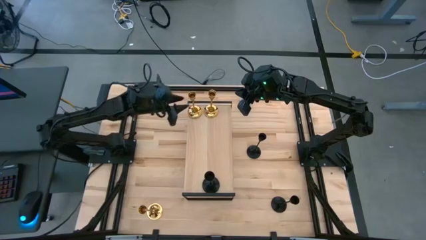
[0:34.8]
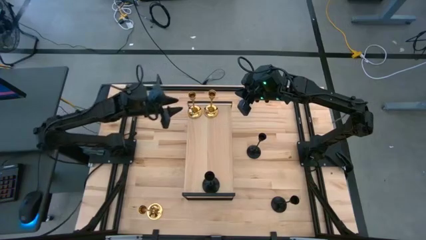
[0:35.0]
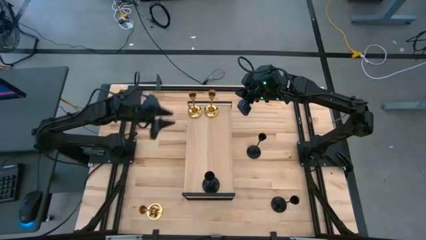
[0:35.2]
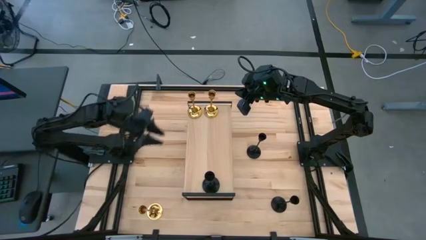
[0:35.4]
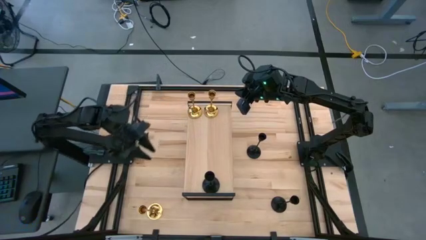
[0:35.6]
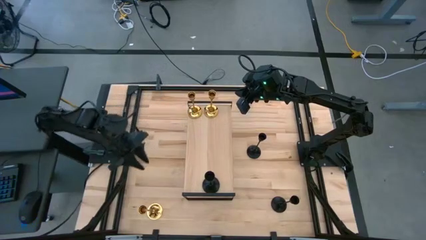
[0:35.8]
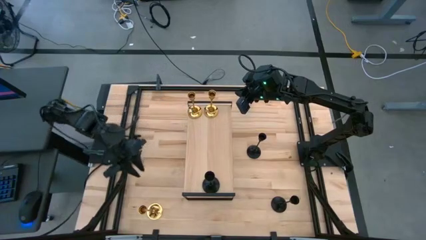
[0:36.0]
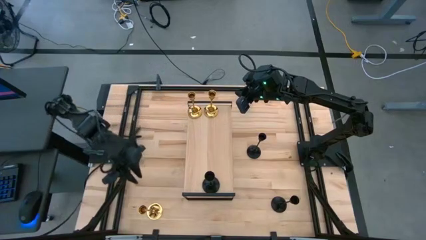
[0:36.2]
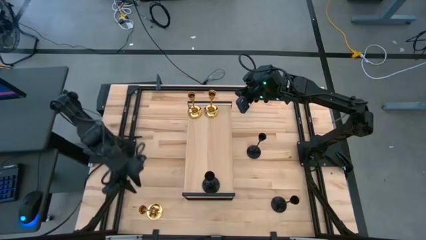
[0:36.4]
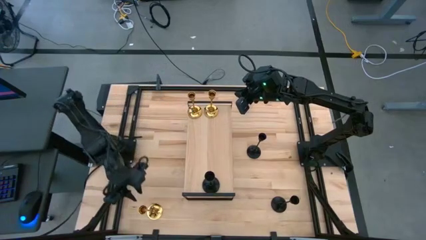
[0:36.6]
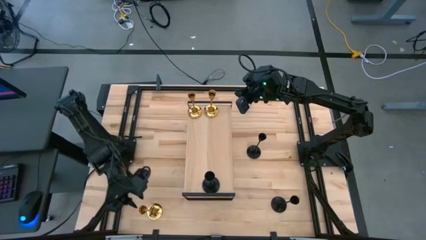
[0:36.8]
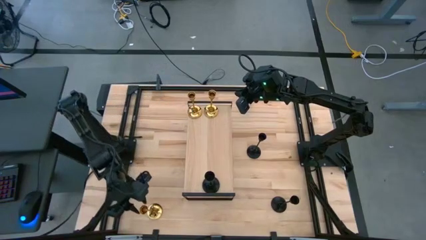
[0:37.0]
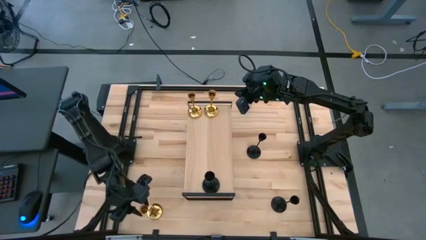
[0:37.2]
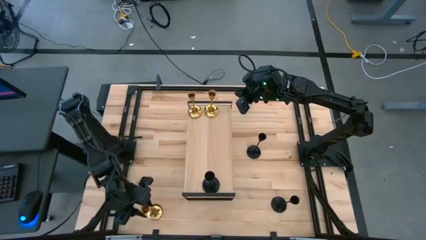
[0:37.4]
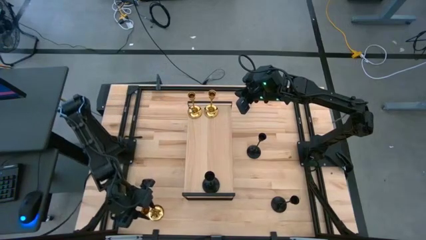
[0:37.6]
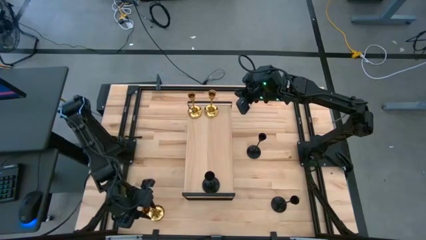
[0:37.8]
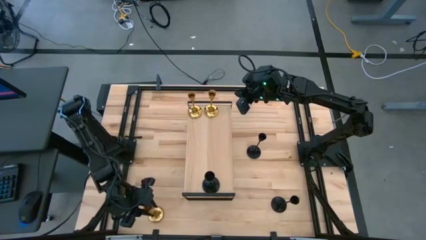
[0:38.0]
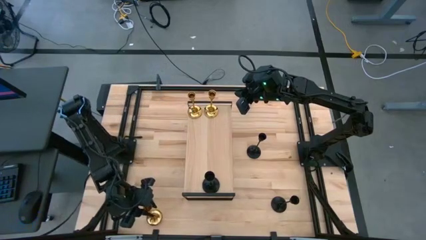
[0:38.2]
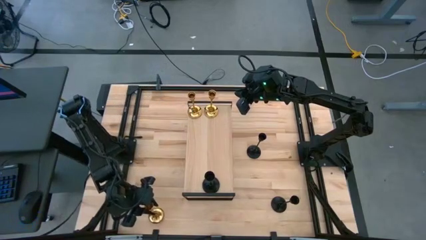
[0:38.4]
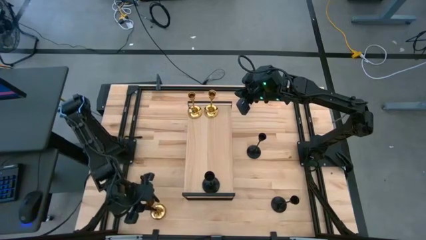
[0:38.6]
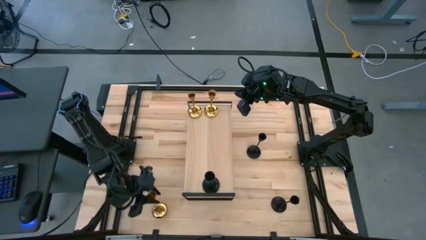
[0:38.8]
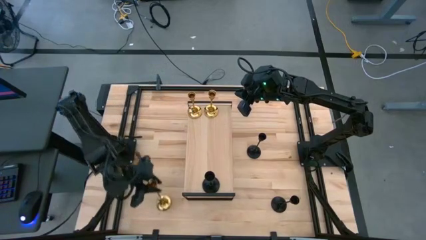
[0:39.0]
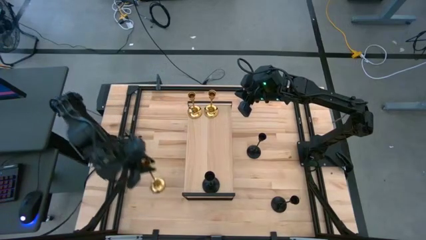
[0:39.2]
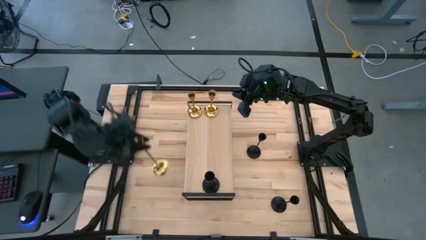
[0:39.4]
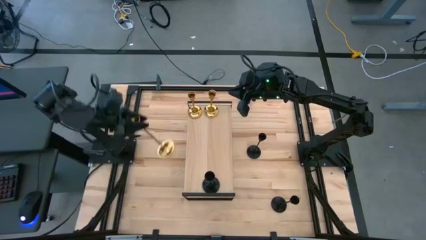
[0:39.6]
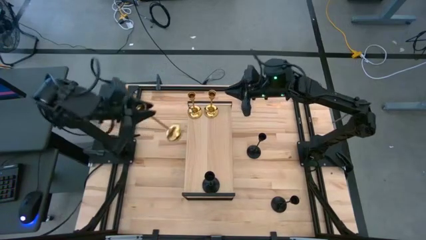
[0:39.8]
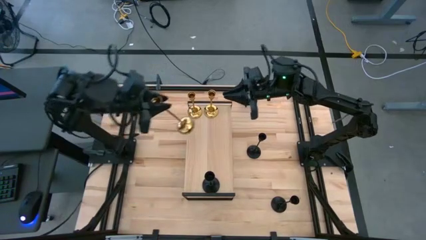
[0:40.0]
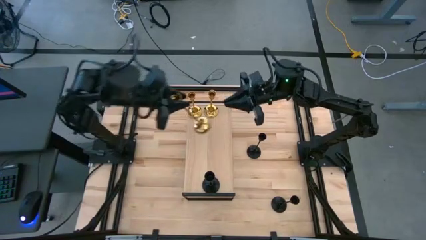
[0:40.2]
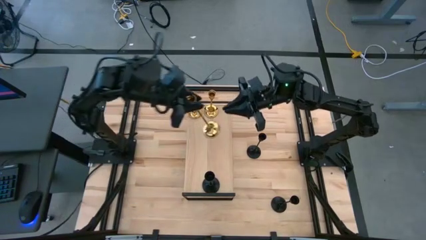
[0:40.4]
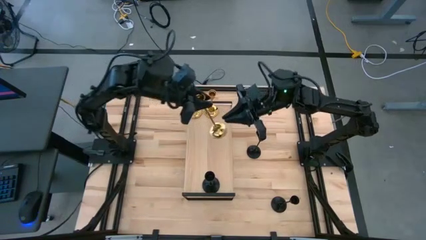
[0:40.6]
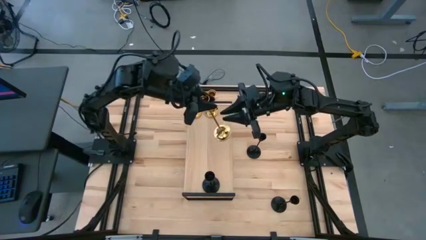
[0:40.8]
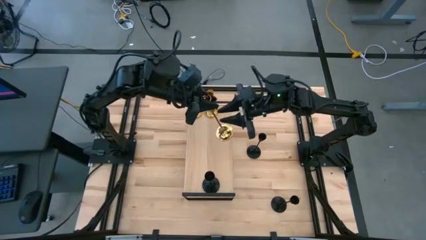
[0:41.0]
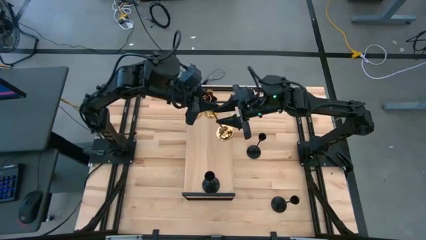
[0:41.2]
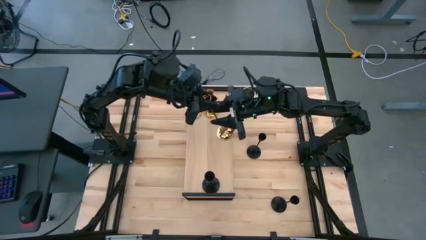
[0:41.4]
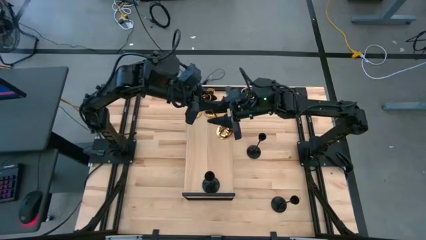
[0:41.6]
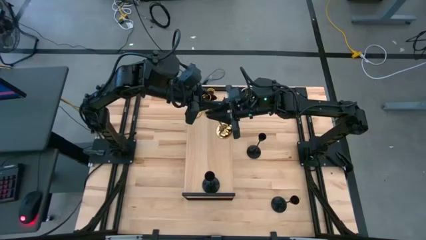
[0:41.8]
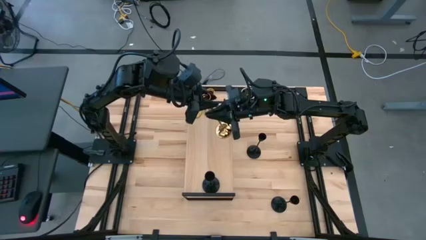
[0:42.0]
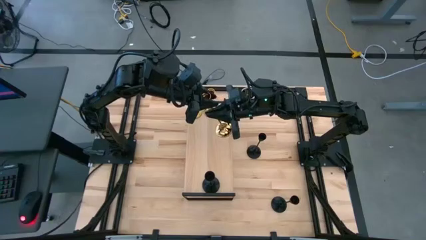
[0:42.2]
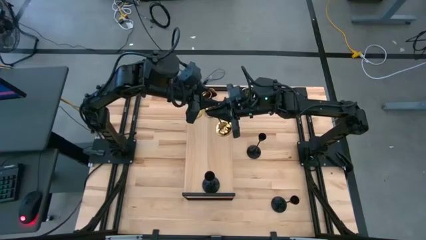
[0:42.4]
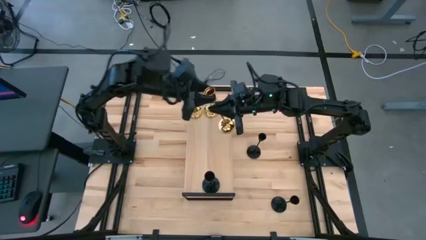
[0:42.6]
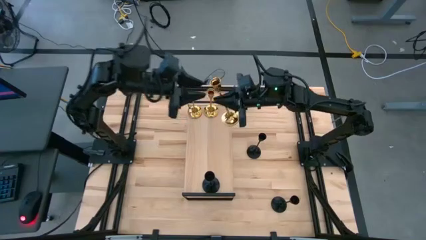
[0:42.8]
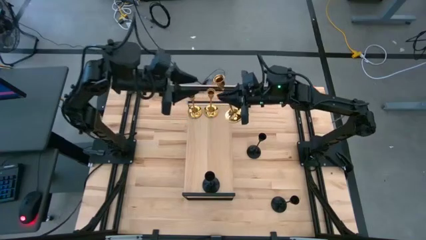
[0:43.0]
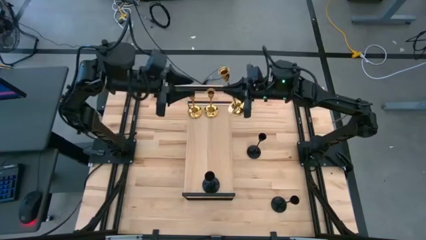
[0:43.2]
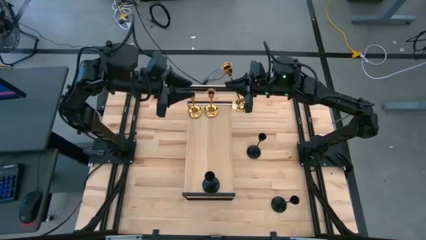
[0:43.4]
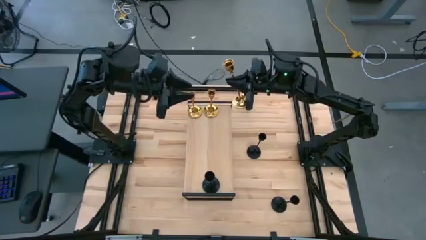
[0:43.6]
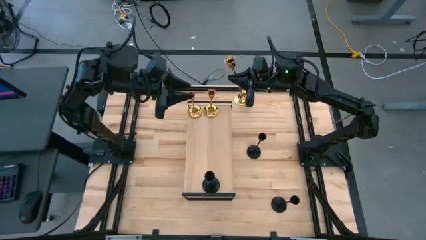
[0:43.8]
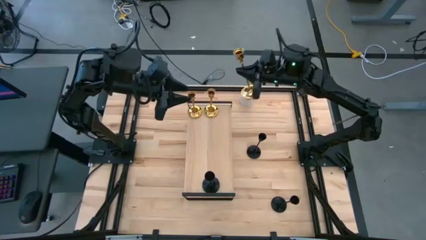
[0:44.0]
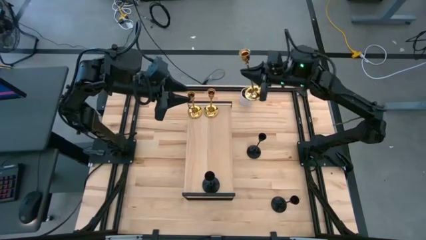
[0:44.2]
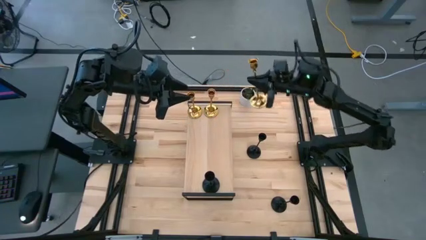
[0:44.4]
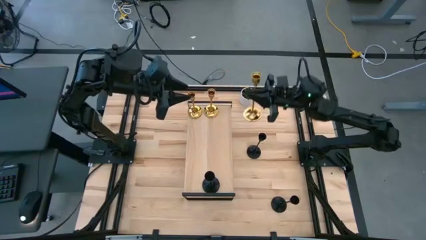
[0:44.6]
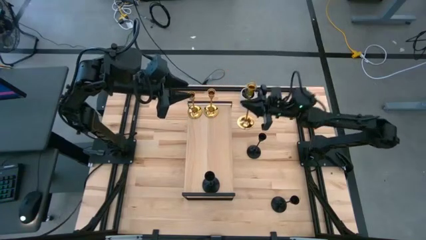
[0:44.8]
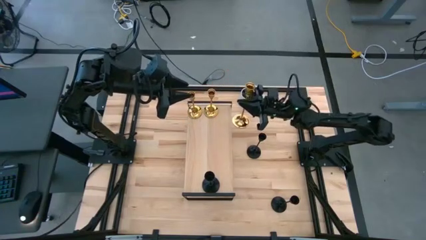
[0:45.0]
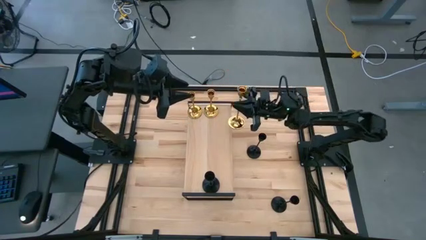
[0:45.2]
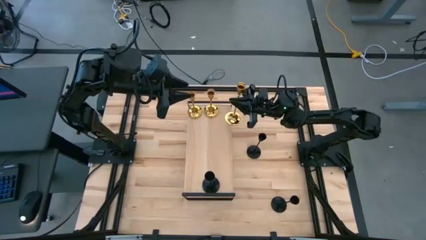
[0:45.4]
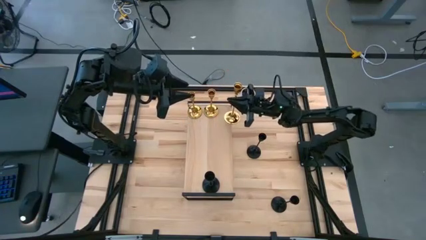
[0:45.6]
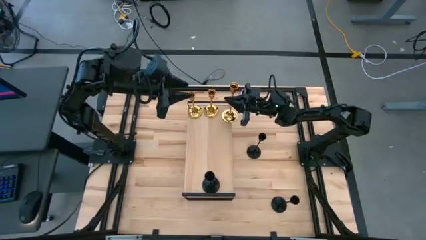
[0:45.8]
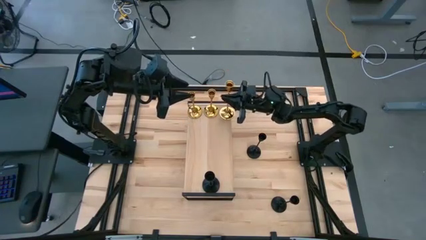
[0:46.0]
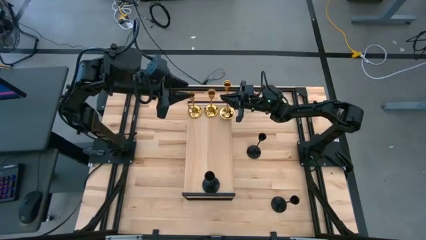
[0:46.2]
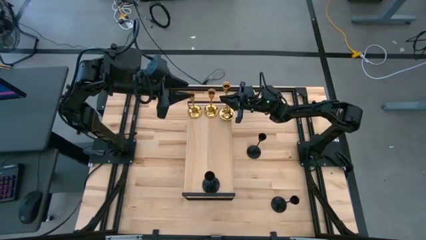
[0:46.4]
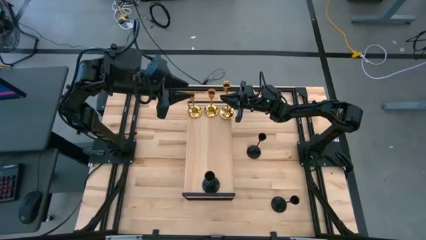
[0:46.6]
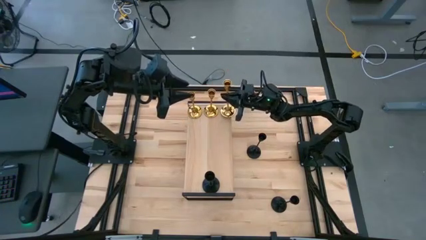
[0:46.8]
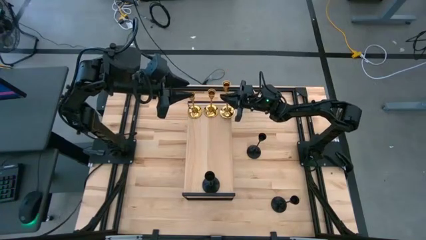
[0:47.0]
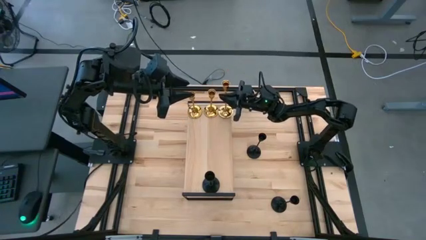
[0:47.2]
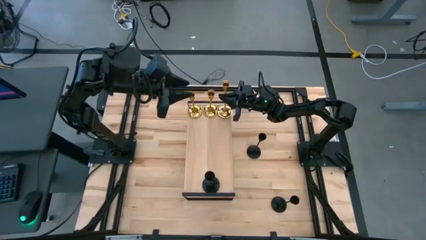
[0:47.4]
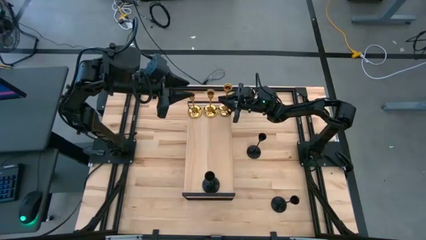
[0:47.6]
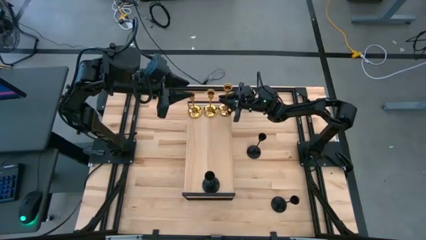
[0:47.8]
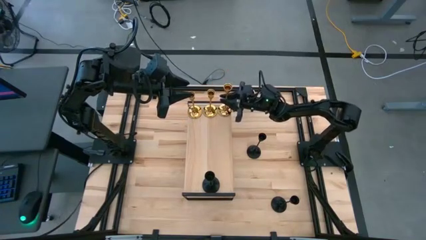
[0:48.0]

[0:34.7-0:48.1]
Task: Pick & Place candle stick holders
Put the gold candle holder on the shelf aligned with the other gold candle holder
